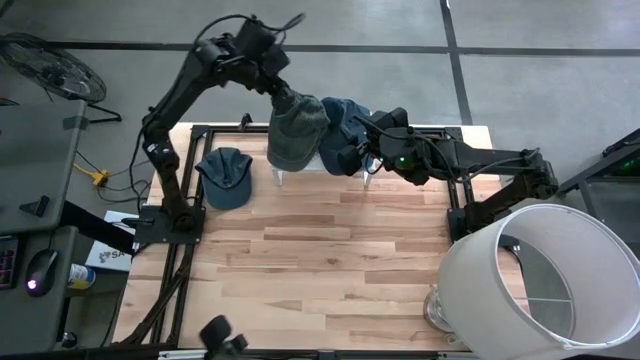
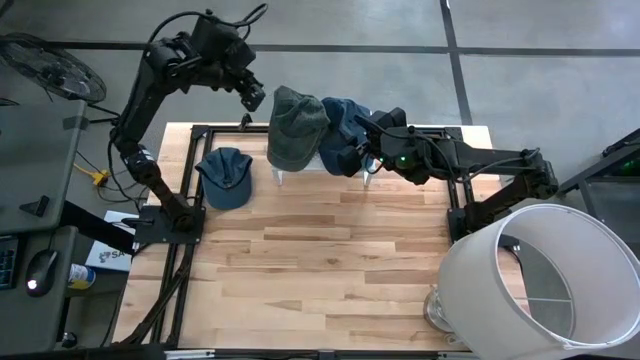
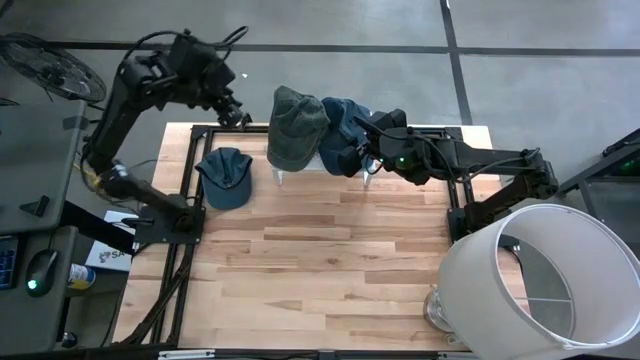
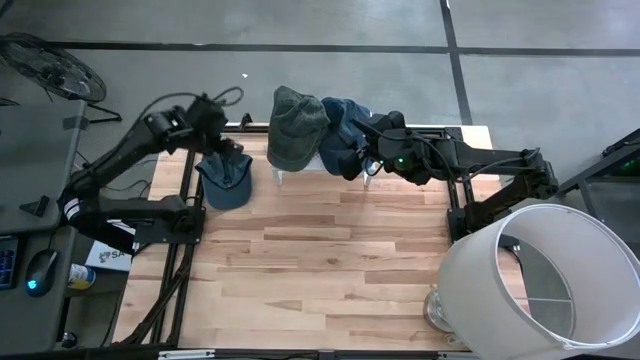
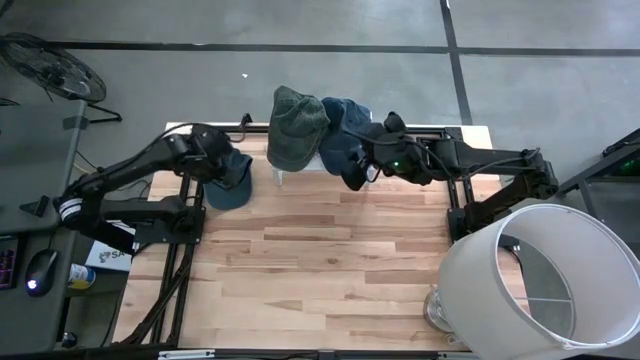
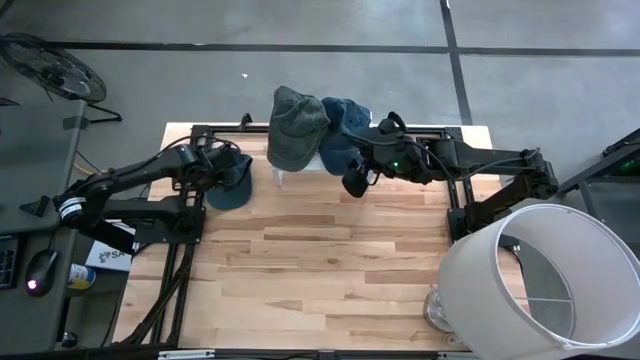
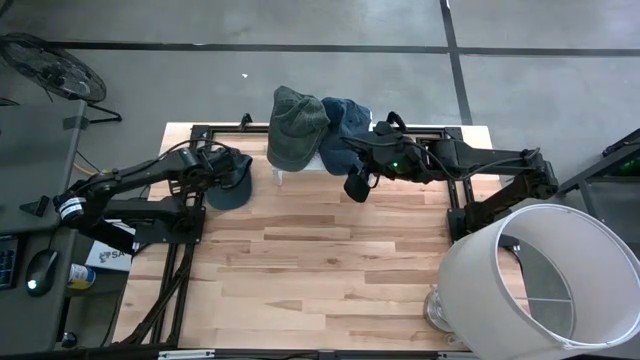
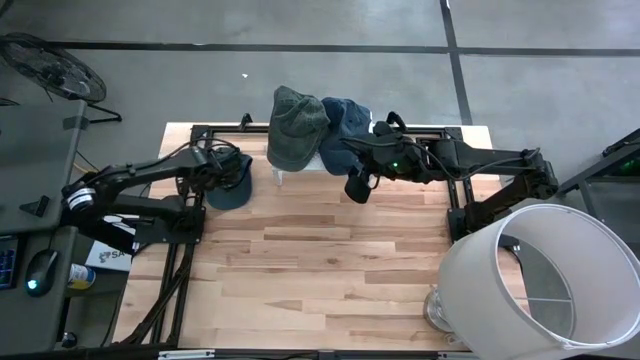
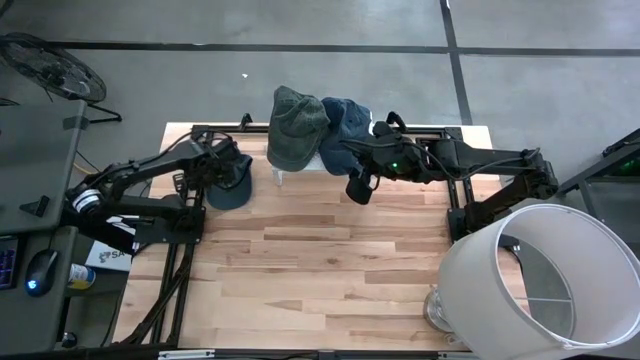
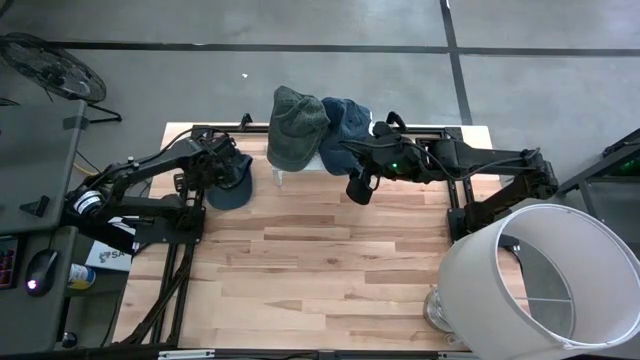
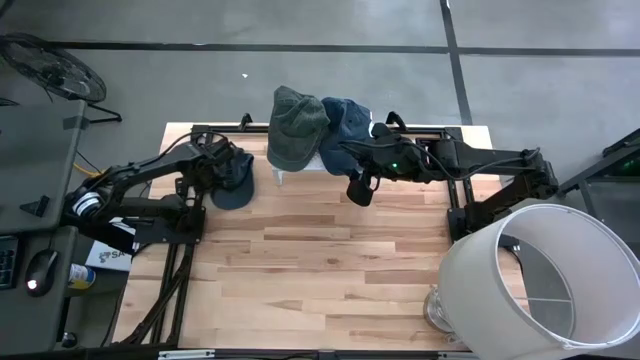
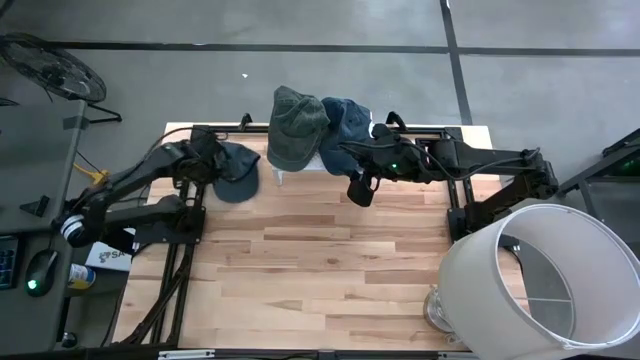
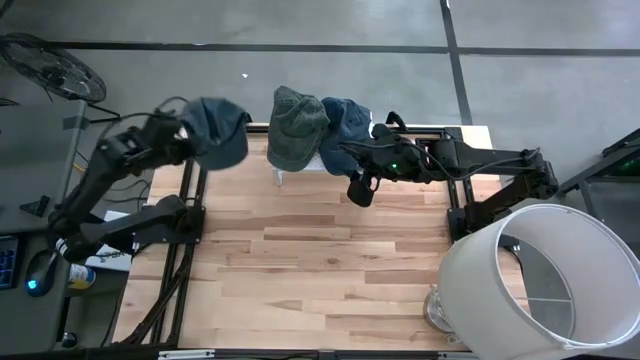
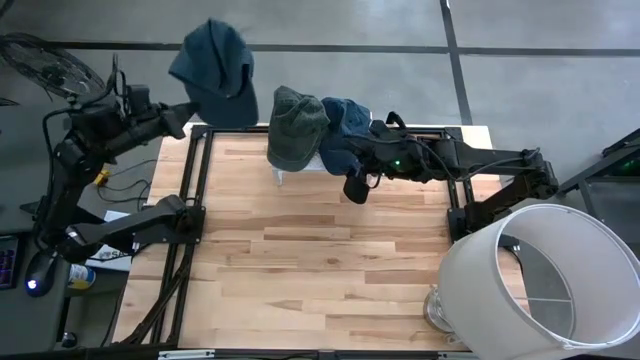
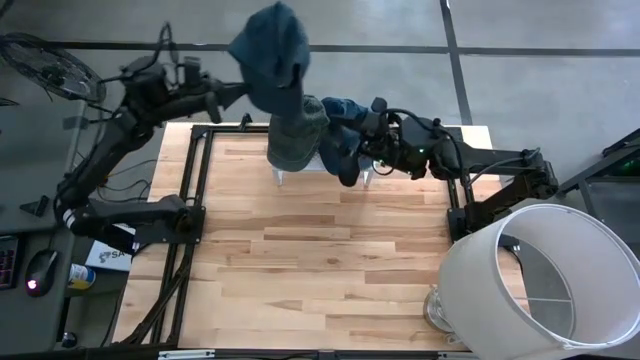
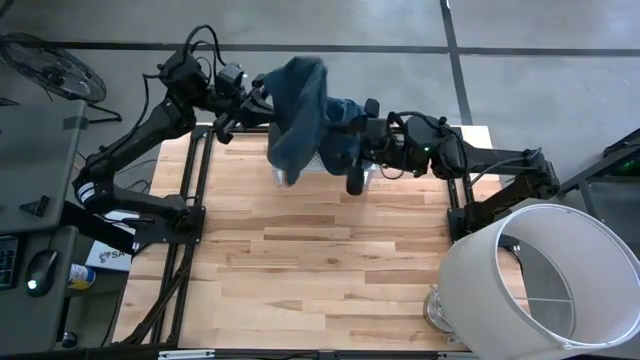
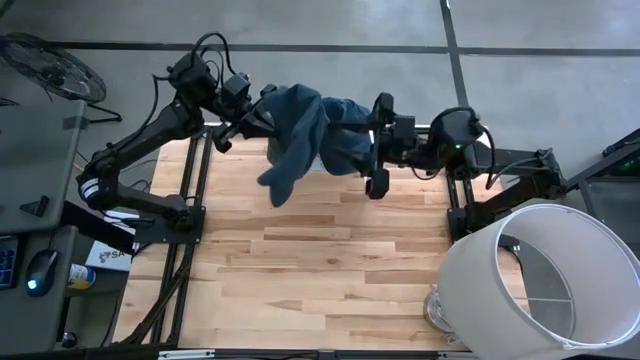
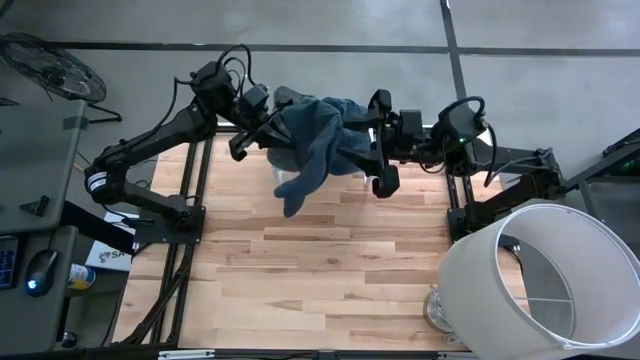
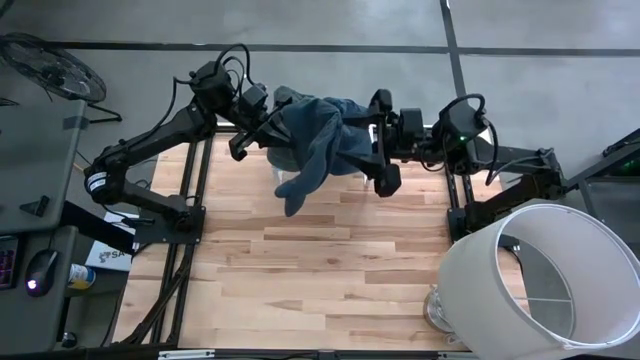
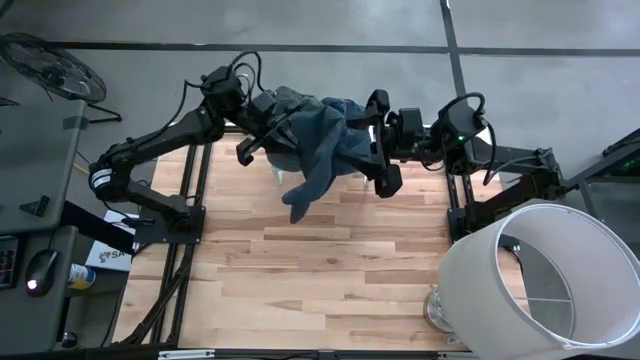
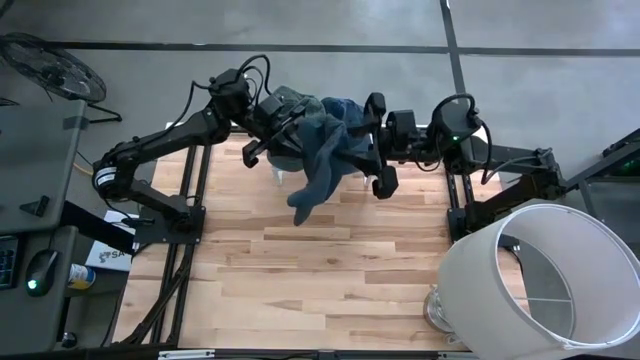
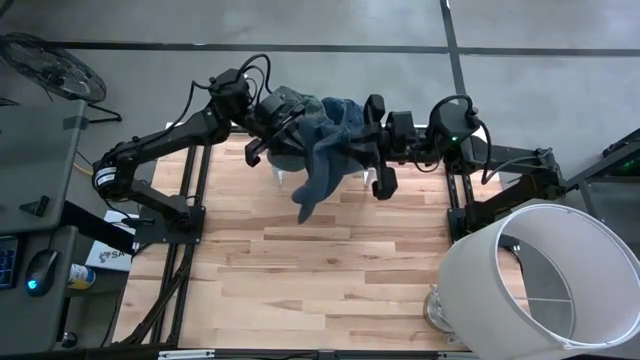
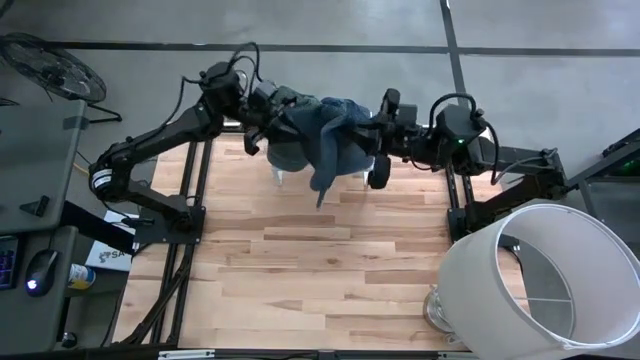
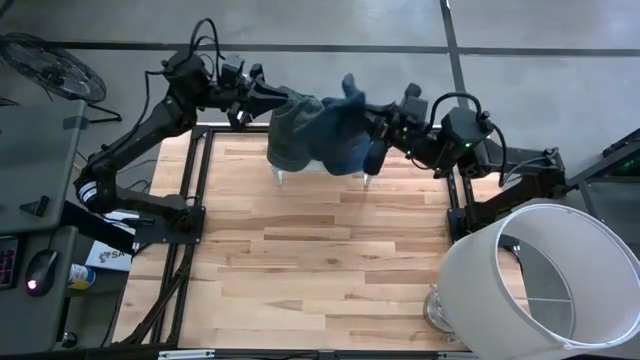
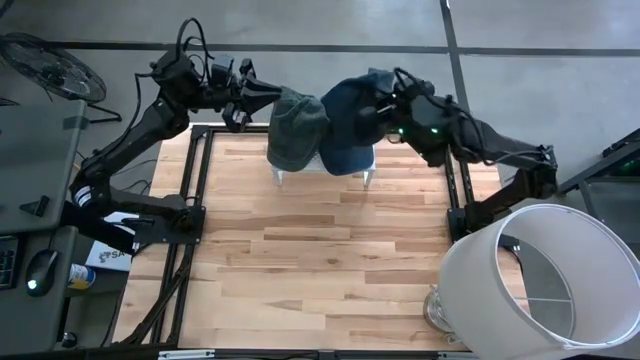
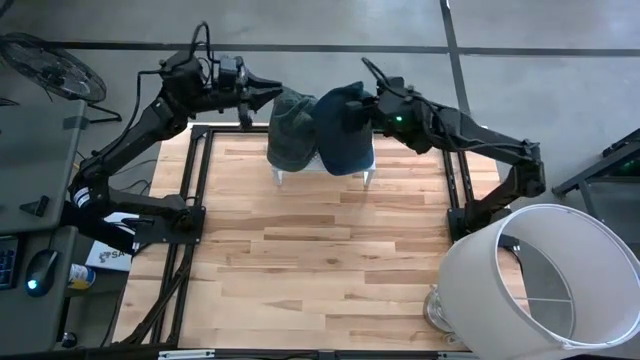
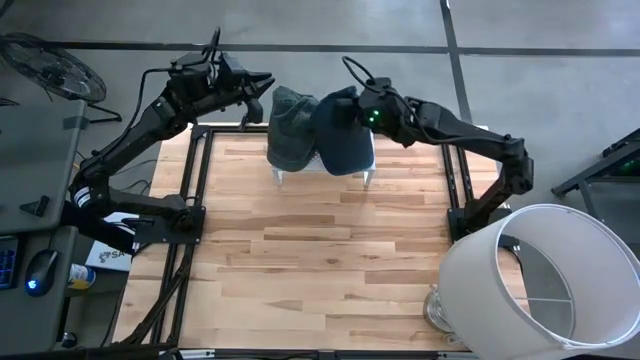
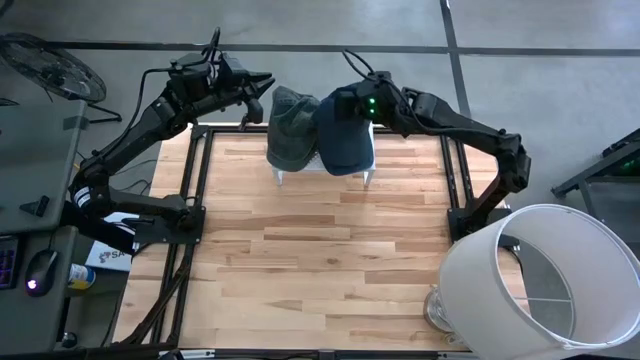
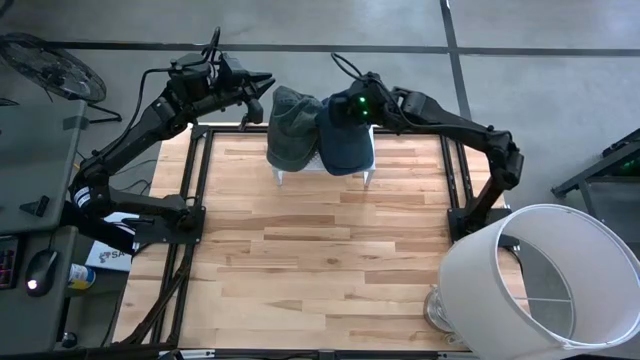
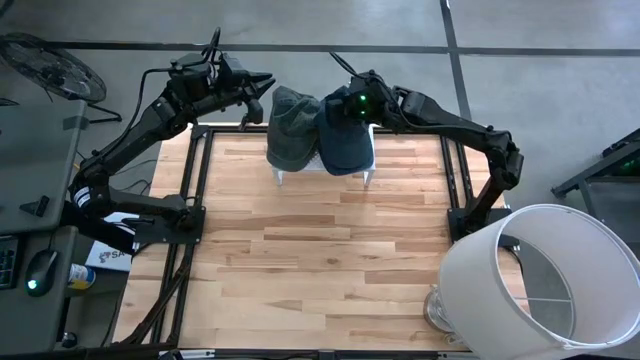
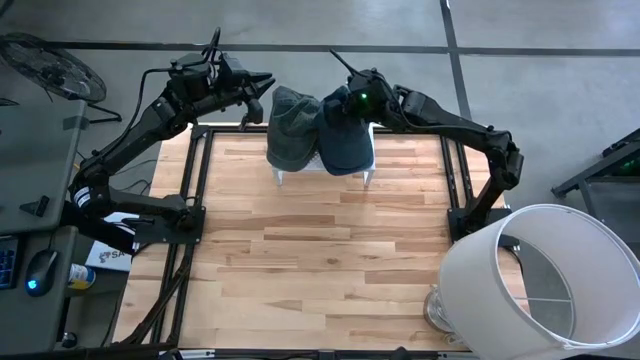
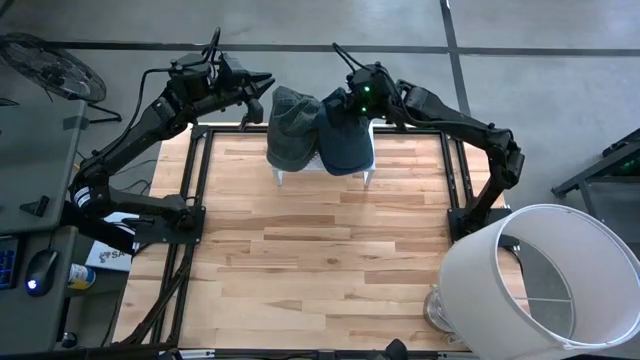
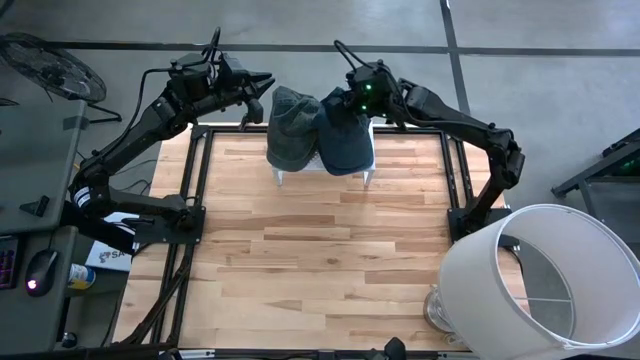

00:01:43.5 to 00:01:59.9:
Task: Pick & Place hat
Put the blue cap on the shelf

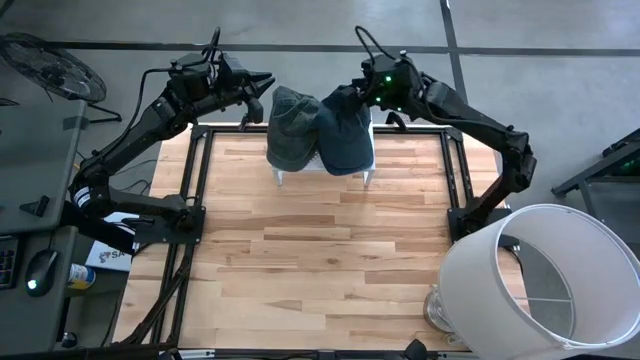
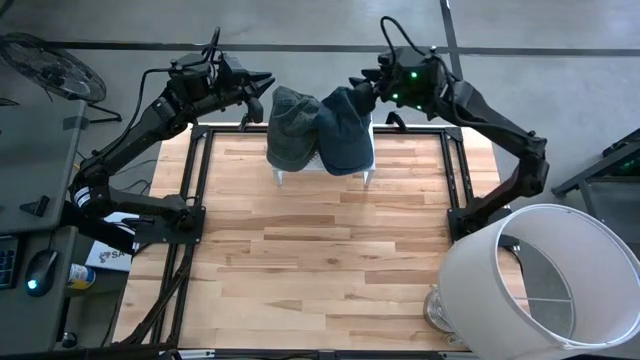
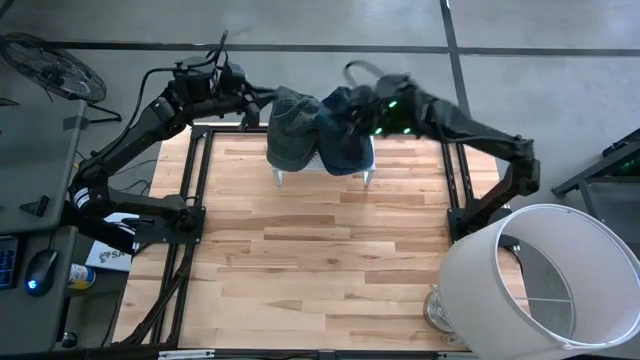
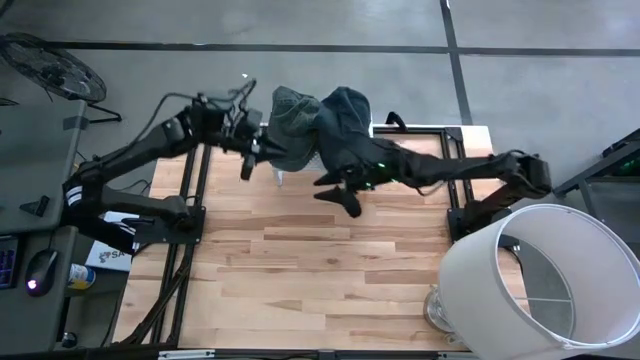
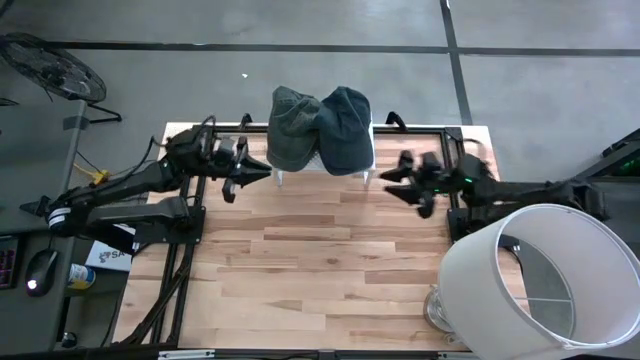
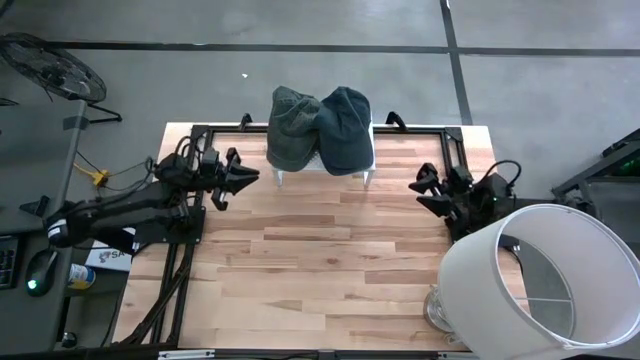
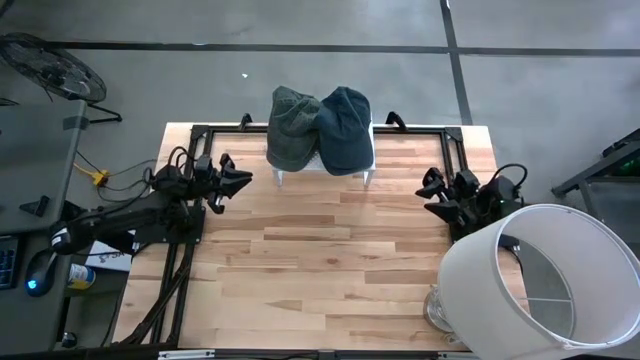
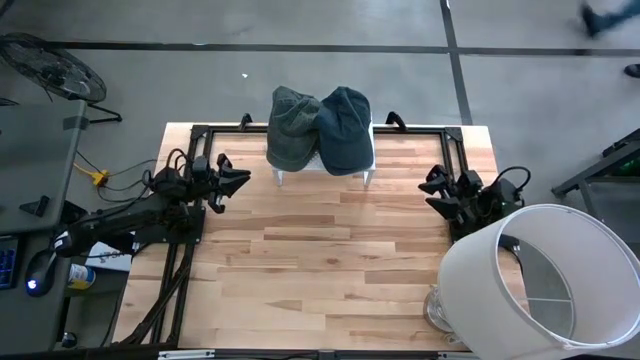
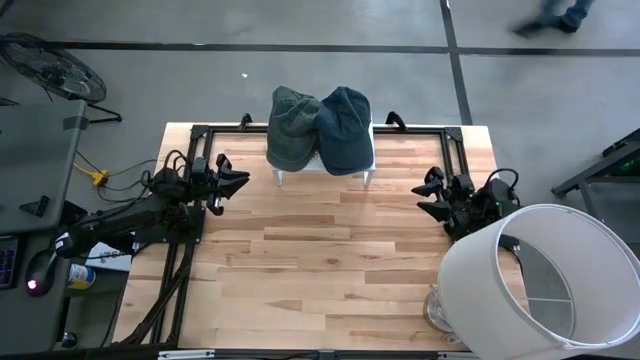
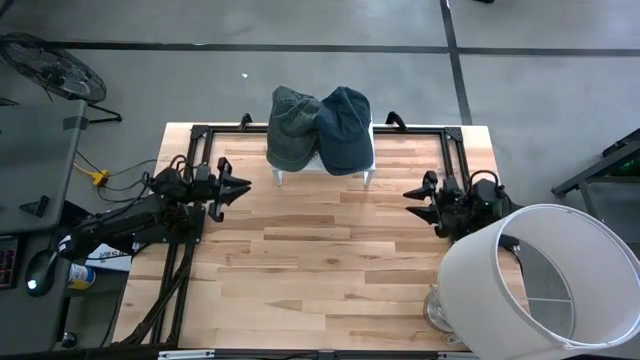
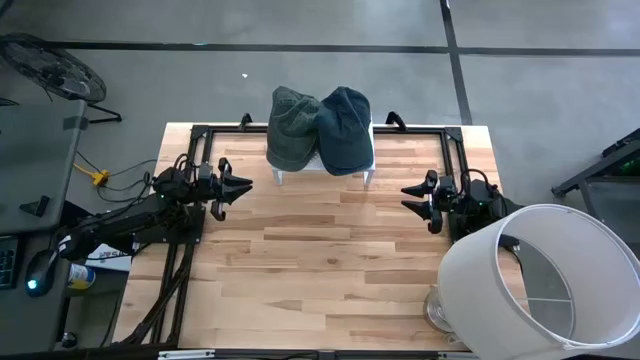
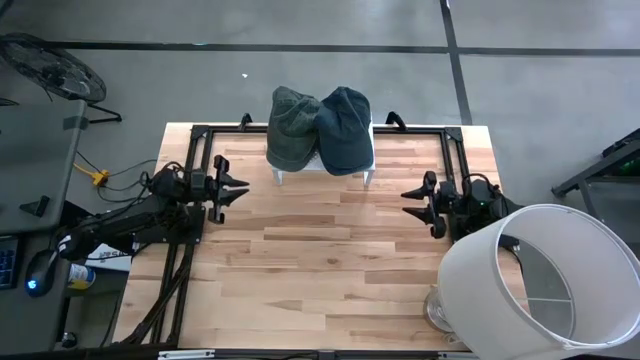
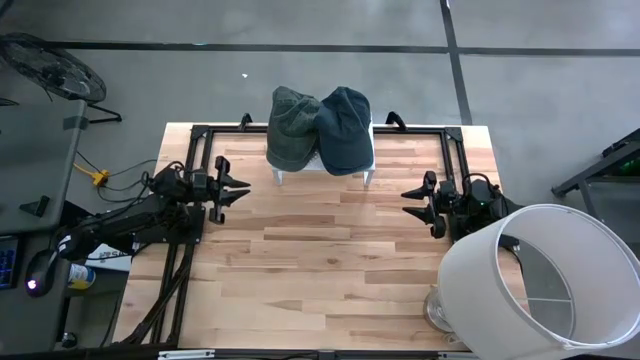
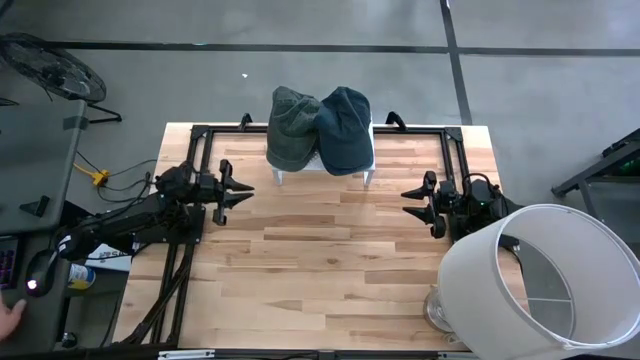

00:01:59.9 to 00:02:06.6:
Return to Home Position
